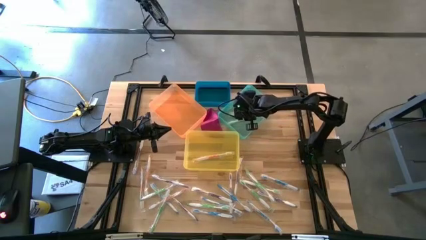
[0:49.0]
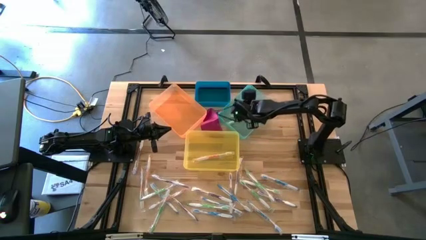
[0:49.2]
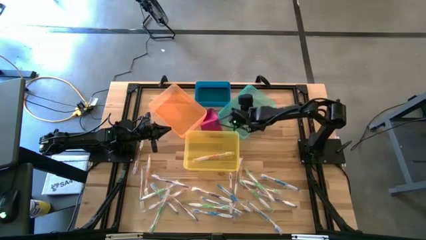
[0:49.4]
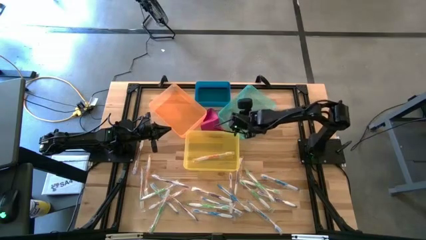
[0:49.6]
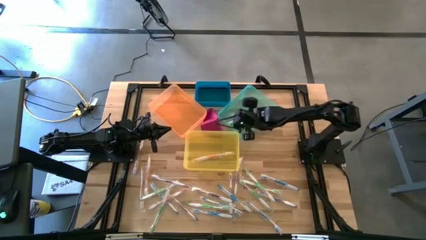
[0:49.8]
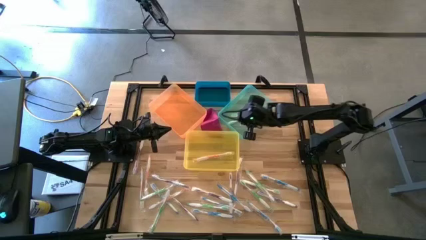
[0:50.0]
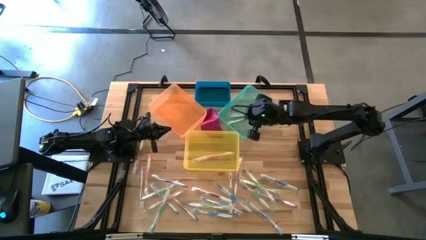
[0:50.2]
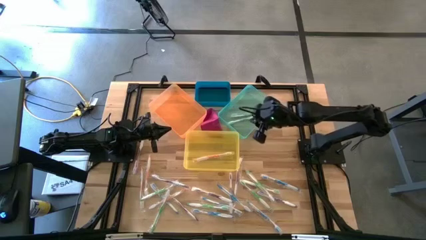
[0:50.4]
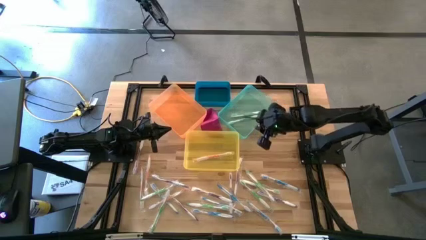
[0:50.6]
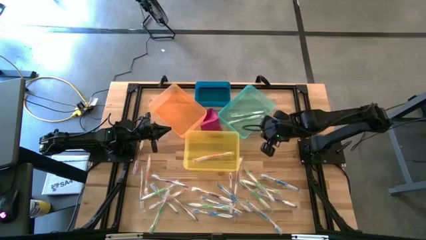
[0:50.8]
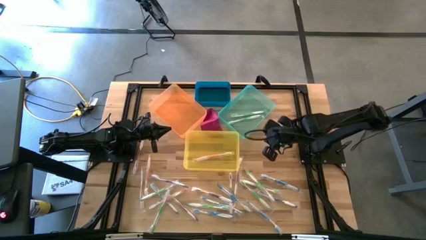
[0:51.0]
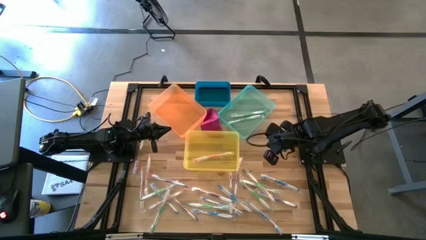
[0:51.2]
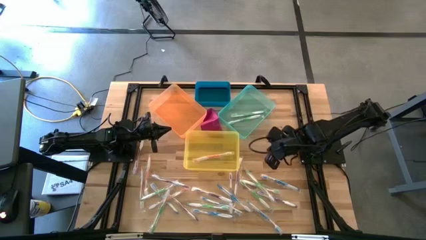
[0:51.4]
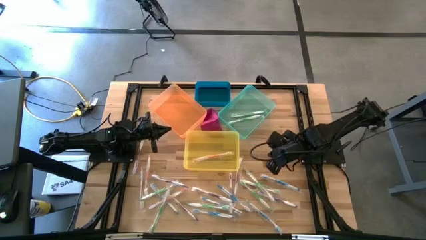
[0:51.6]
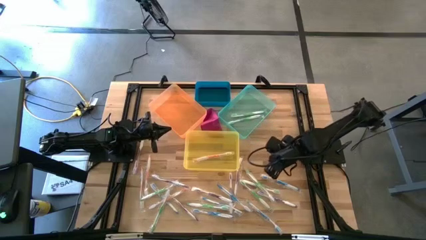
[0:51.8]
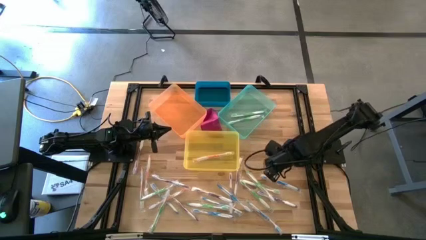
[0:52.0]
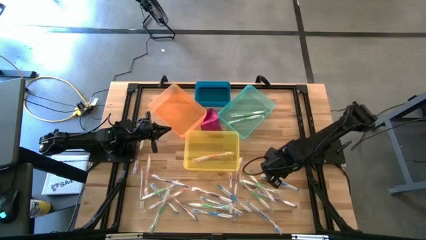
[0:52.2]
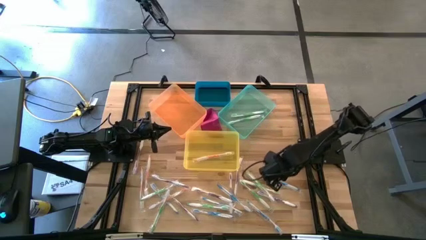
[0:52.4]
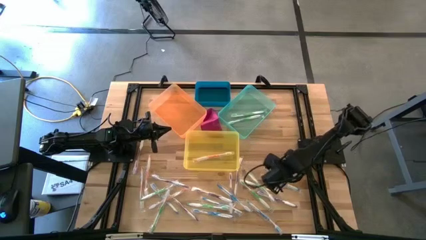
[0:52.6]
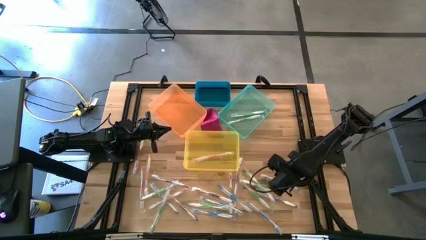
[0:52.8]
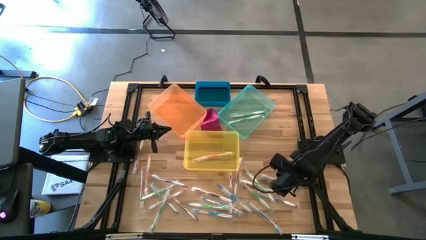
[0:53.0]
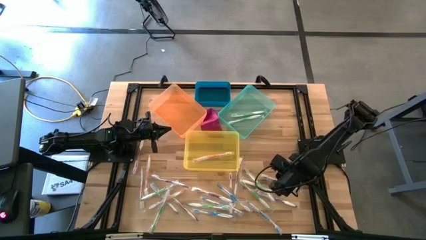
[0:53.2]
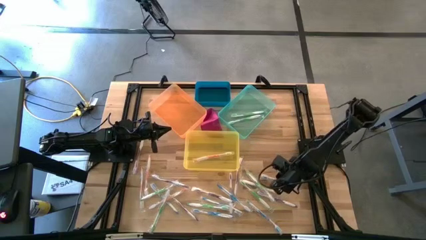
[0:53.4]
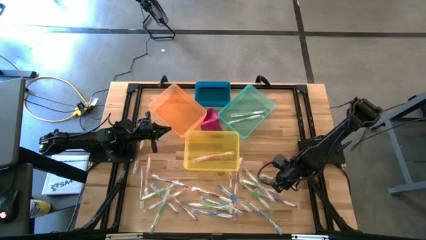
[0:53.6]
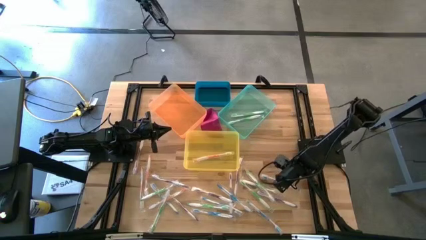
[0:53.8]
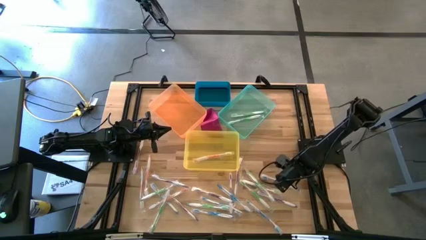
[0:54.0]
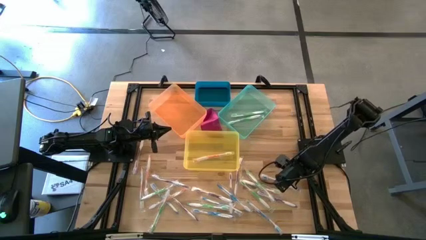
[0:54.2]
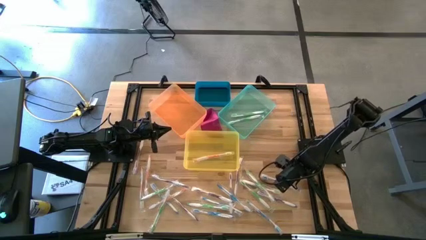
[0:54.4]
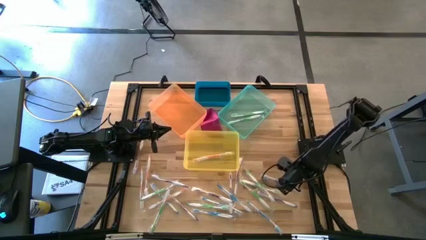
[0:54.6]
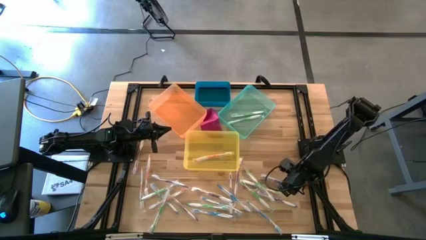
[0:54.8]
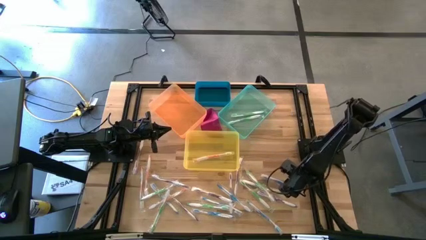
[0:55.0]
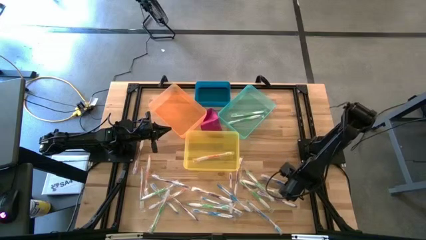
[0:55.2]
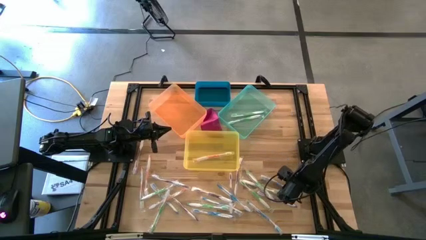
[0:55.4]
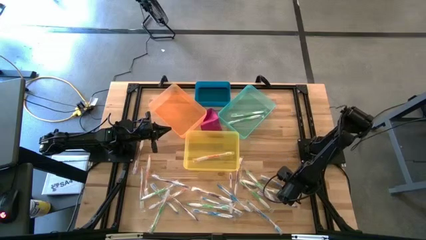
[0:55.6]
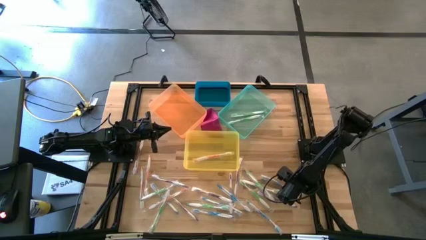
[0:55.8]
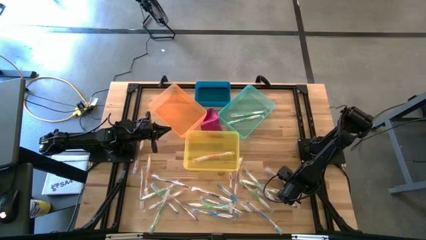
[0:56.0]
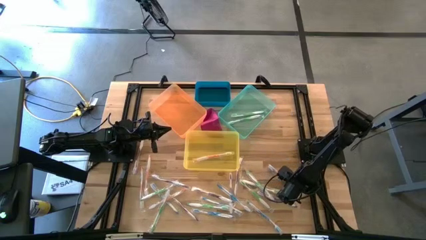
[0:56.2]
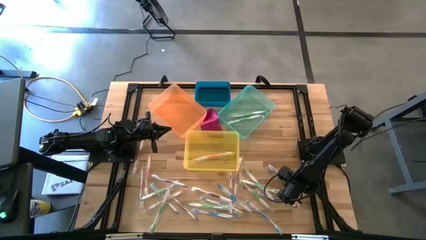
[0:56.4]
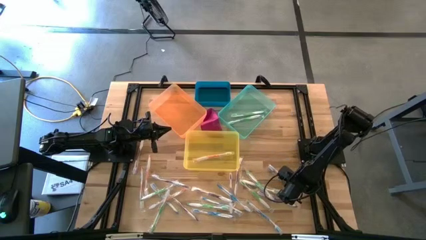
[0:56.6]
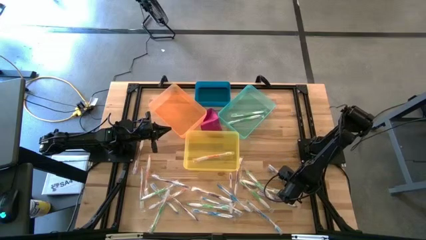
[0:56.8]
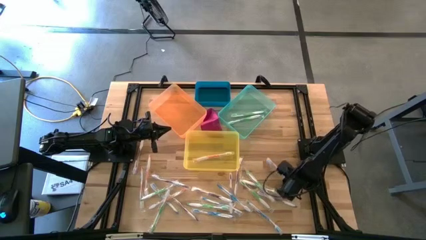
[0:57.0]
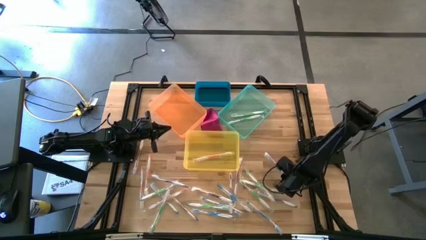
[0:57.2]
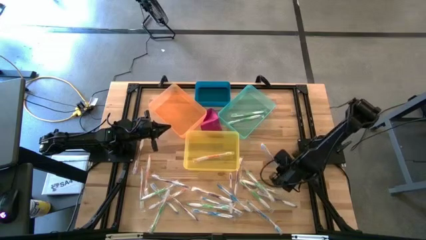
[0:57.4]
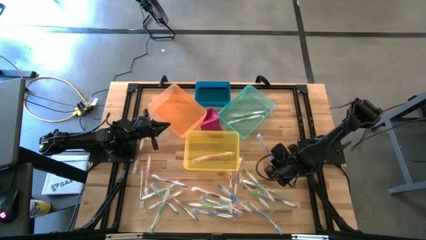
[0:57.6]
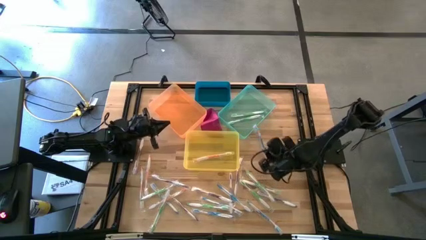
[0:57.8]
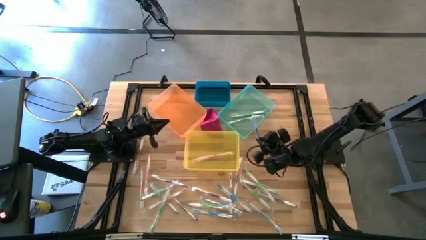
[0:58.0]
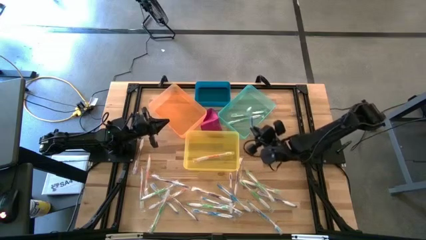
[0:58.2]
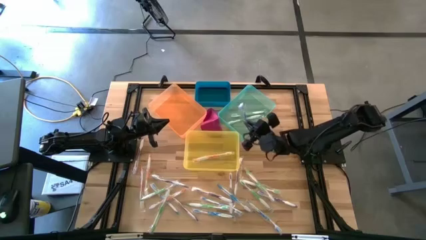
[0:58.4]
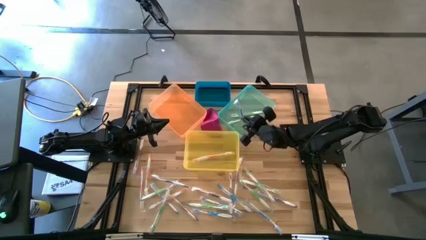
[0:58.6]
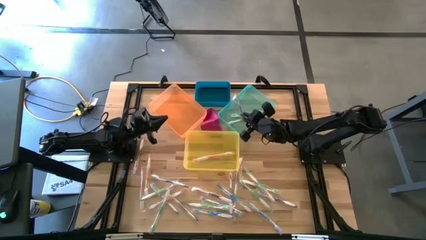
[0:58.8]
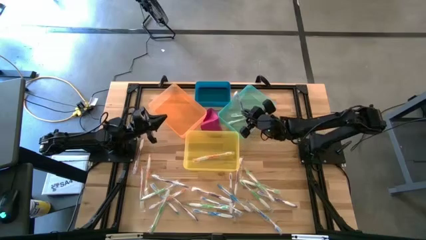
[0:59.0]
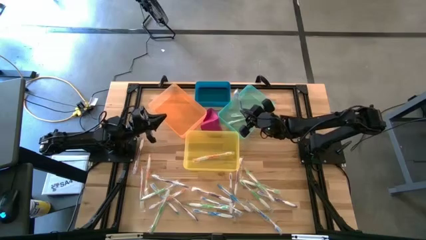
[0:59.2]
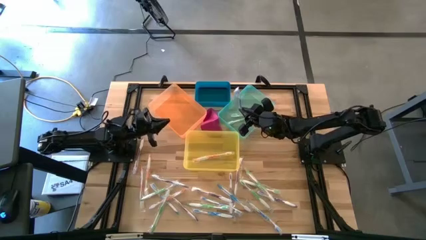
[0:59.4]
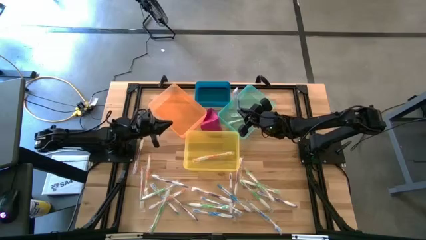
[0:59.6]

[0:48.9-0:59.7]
Task: Pick & Place Toothbrushes
Put the blue toothbrush into the blue bin

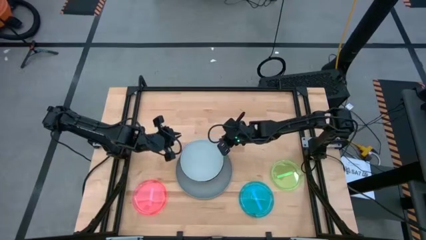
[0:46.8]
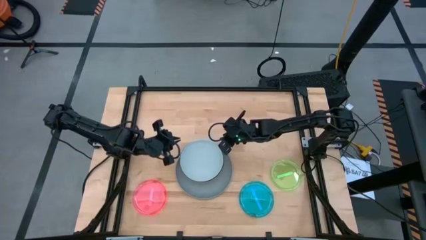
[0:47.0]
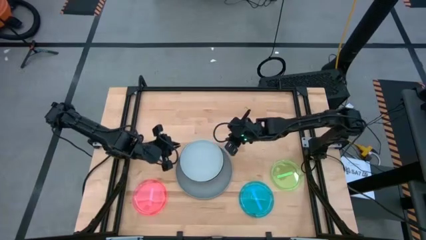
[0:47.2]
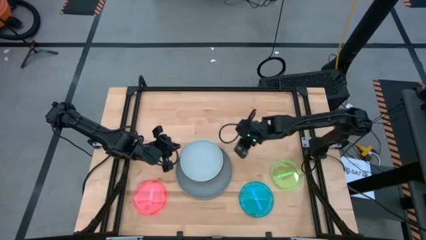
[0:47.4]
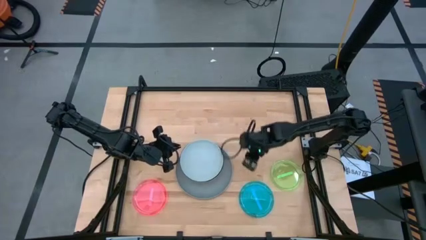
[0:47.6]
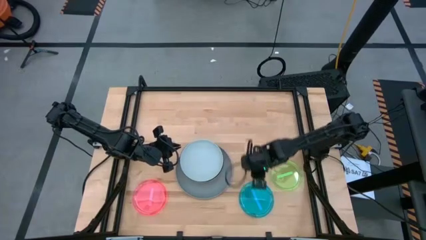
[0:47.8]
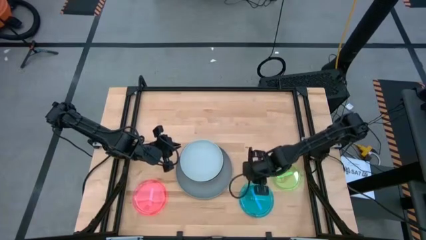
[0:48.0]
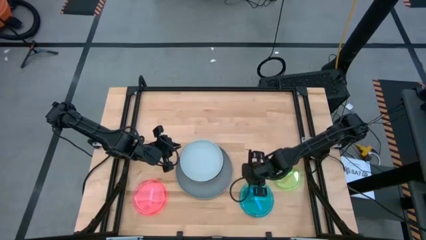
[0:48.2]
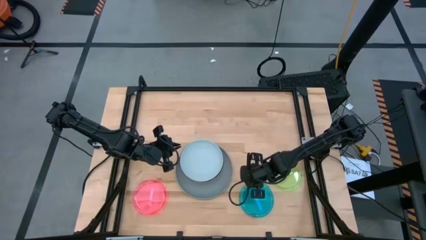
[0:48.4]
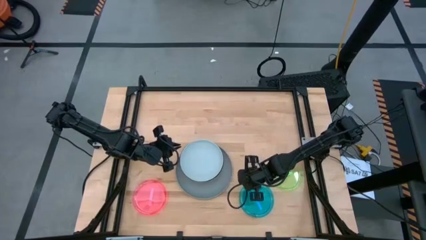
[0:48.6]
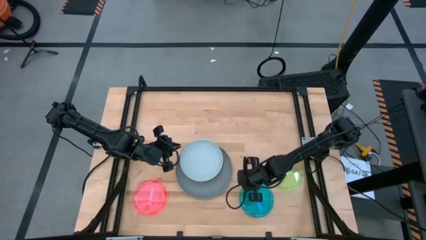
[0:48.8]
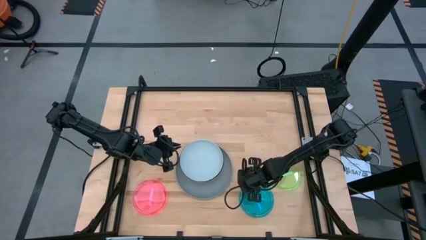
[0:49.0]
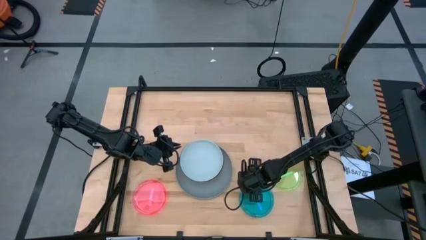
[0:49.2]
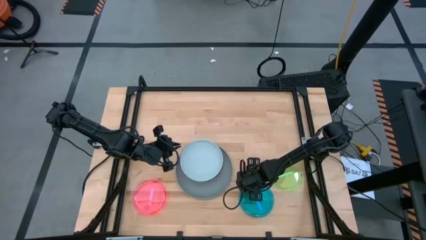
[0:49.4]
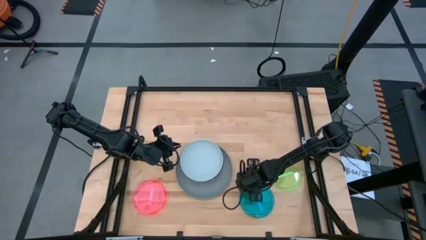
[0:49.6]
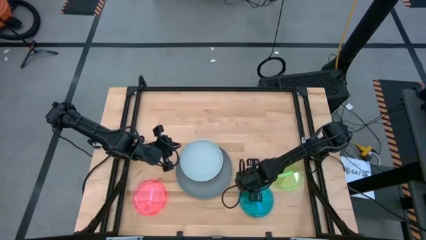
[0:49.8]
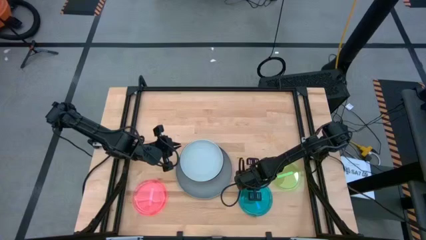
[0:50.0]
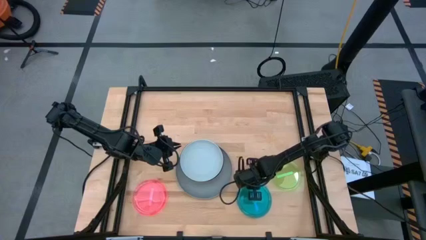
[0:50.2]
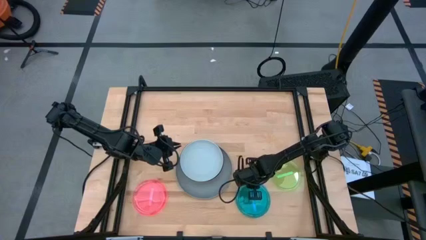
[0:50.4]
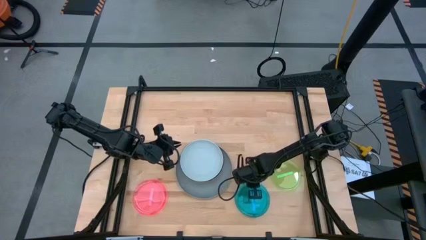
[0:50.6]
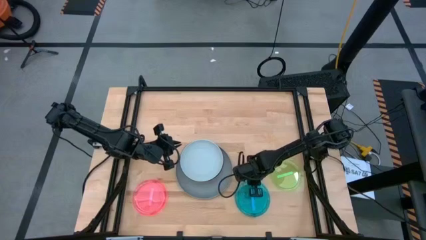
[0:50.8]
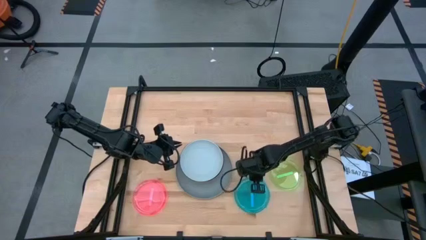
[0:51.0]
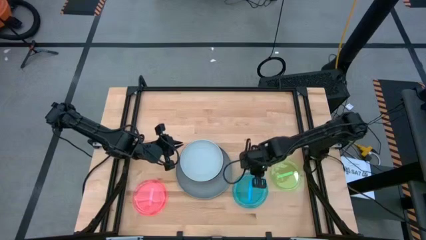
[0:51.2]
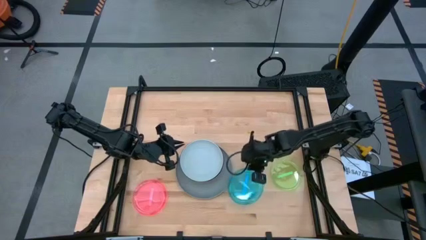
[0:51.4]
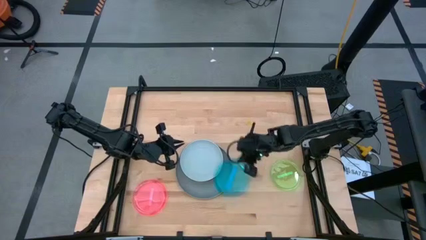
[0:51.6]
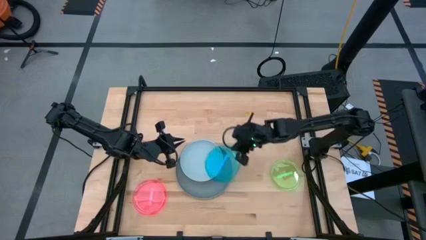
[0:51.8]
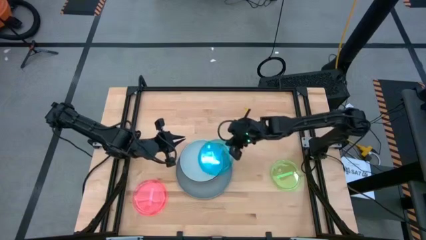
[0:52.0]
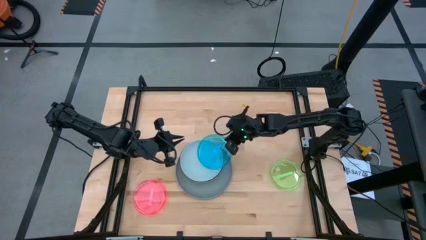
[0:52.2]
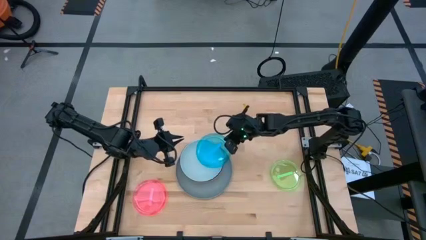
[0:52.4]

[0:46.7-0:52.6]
Task: Stack plastic plates
Stack the blue plate on top of the light blue plate
